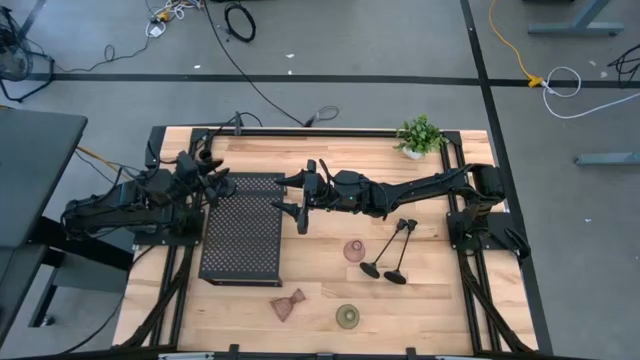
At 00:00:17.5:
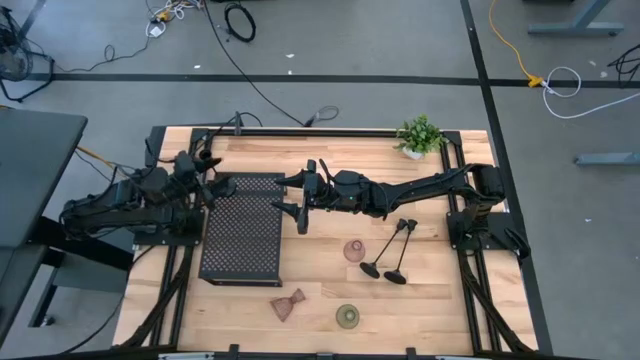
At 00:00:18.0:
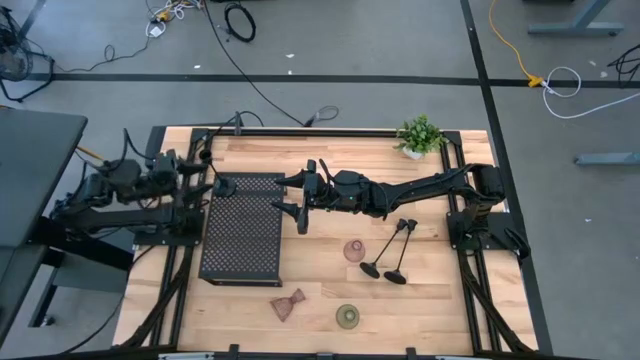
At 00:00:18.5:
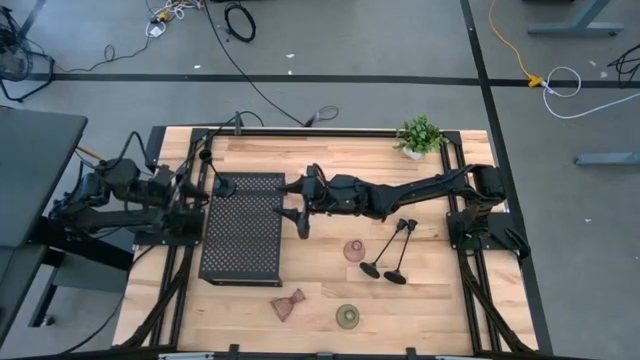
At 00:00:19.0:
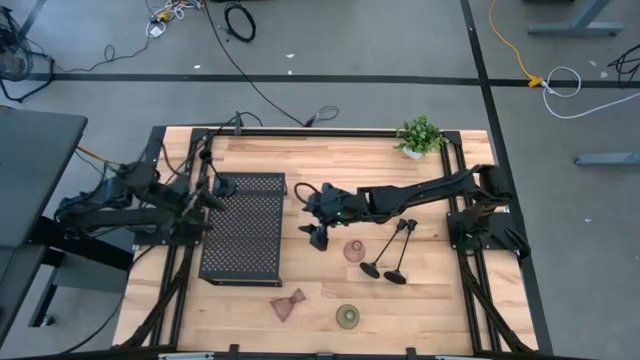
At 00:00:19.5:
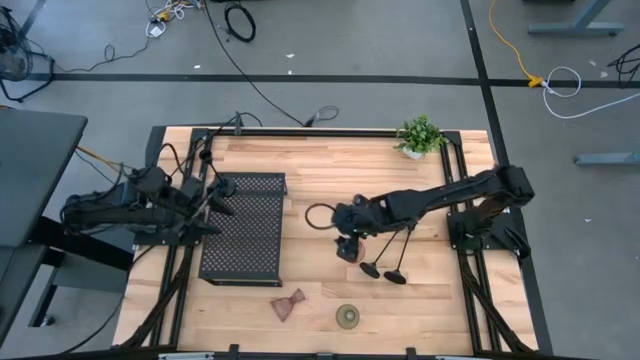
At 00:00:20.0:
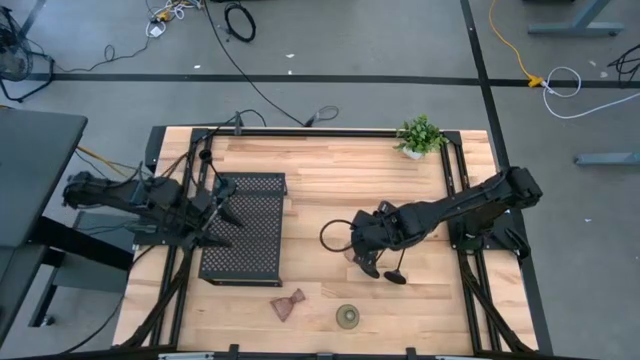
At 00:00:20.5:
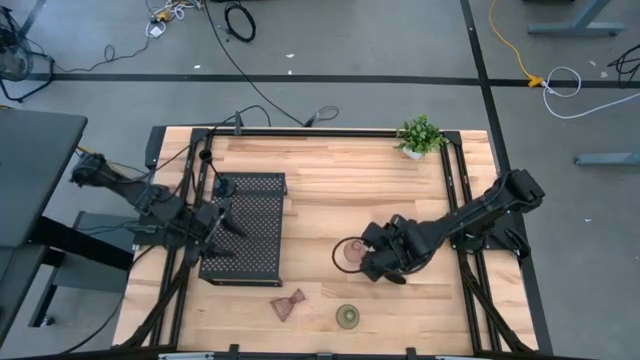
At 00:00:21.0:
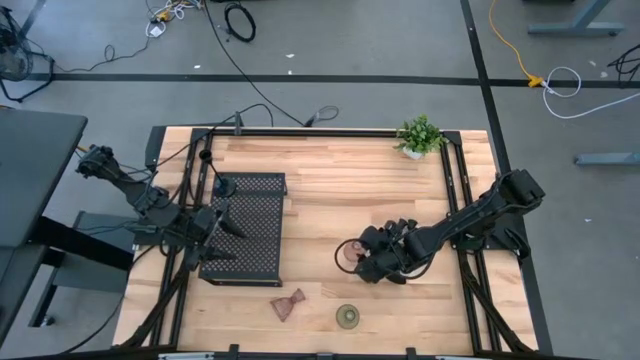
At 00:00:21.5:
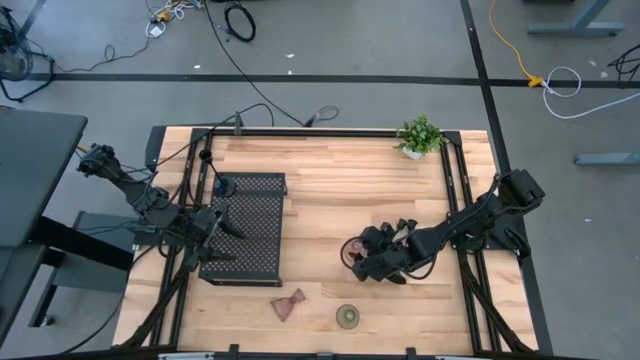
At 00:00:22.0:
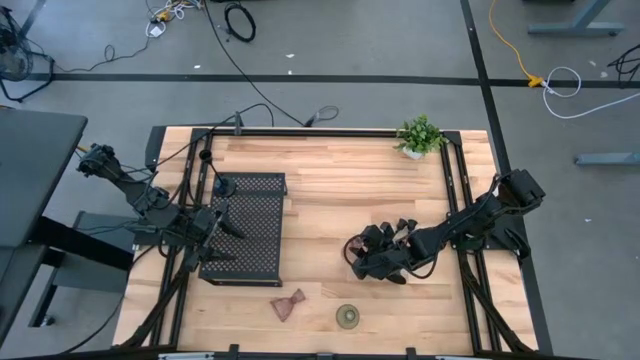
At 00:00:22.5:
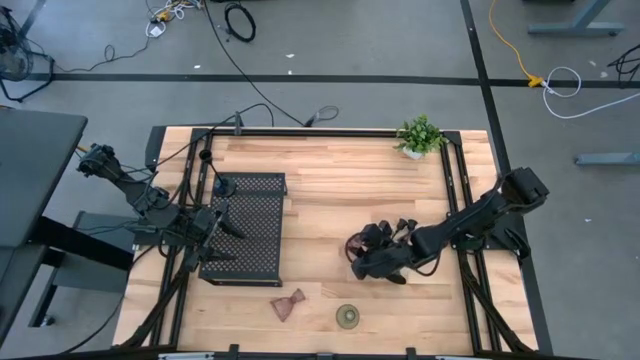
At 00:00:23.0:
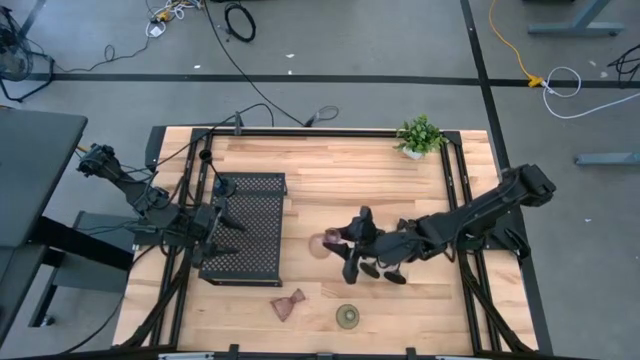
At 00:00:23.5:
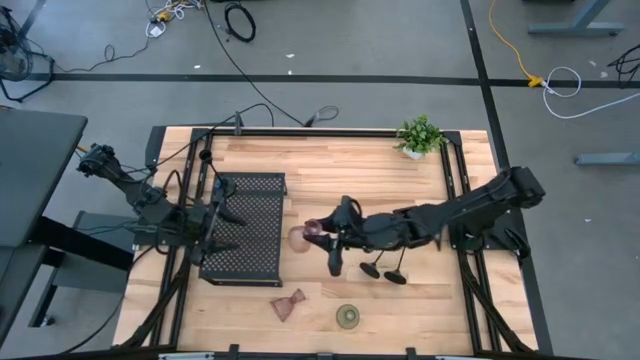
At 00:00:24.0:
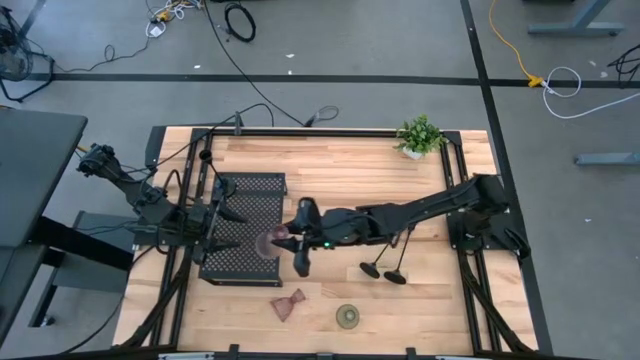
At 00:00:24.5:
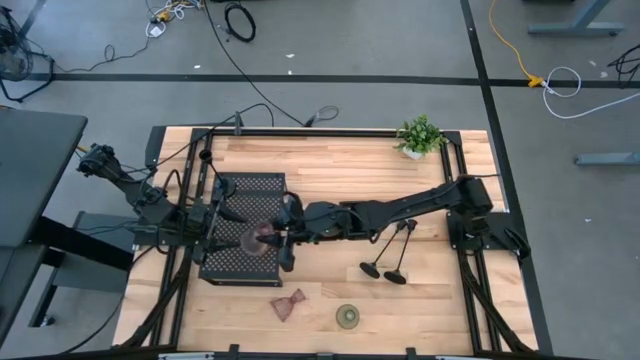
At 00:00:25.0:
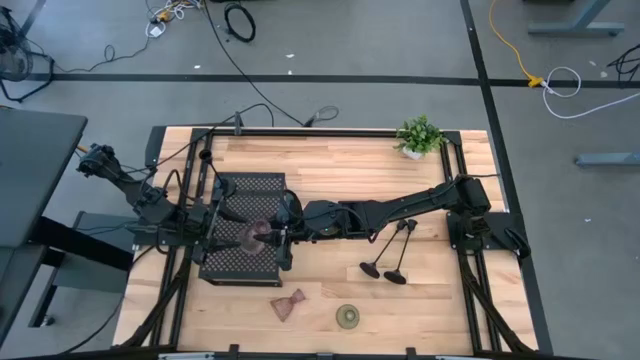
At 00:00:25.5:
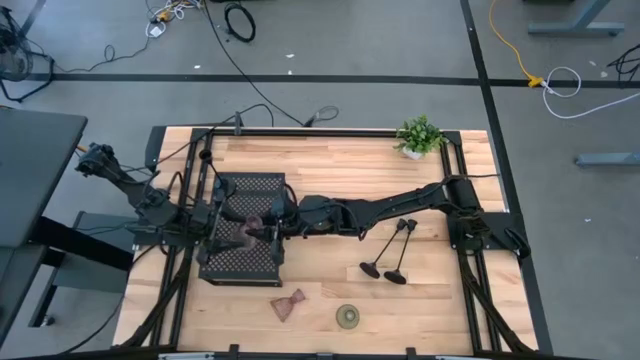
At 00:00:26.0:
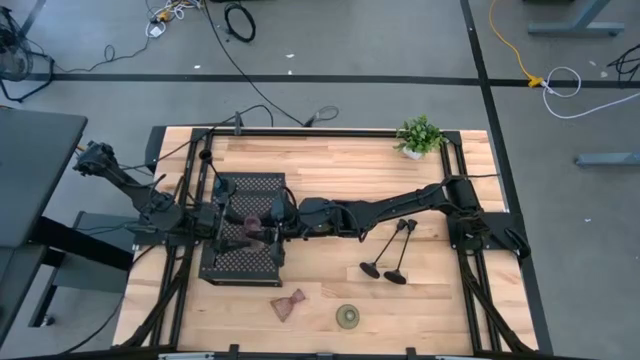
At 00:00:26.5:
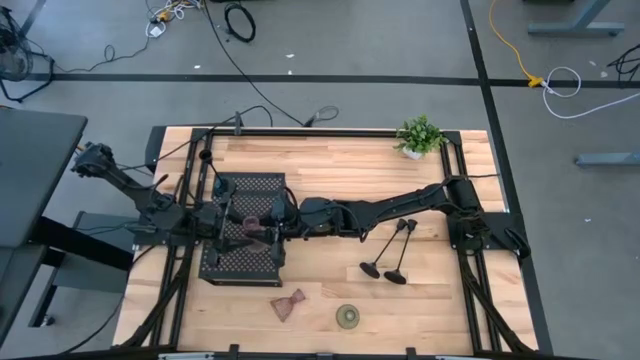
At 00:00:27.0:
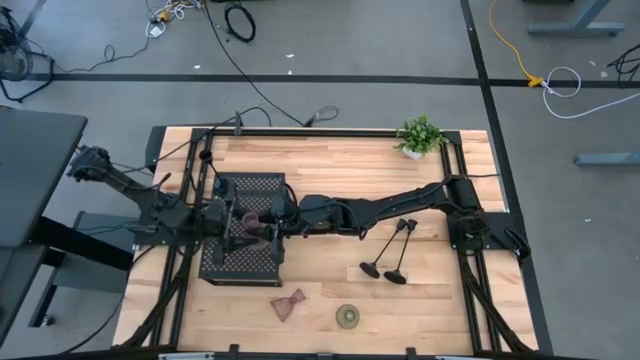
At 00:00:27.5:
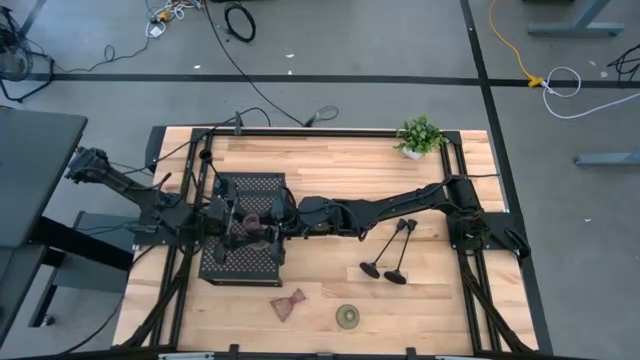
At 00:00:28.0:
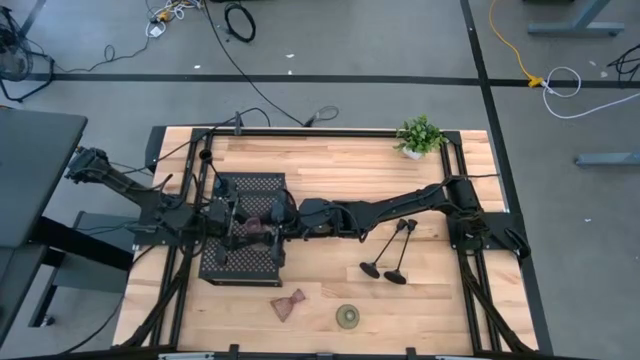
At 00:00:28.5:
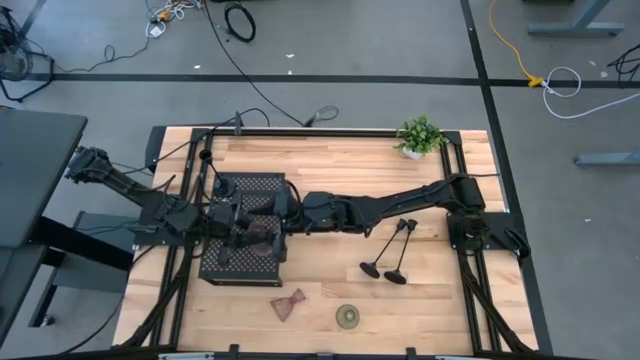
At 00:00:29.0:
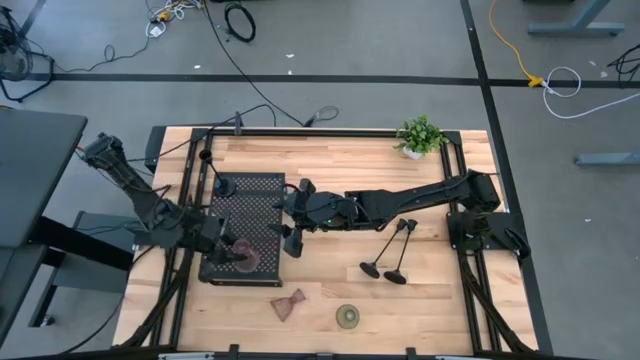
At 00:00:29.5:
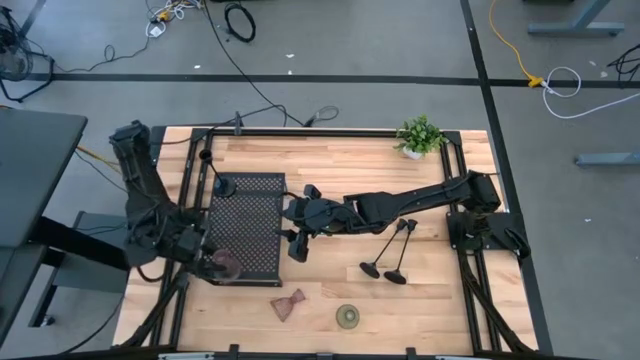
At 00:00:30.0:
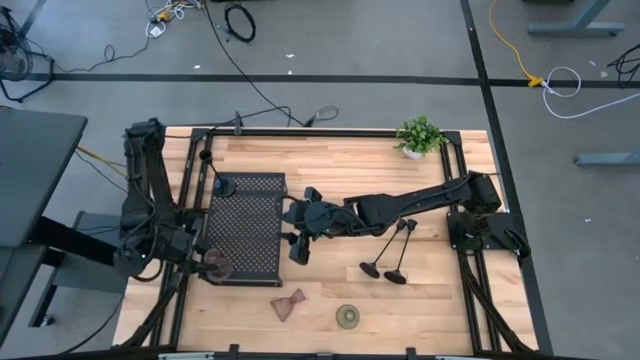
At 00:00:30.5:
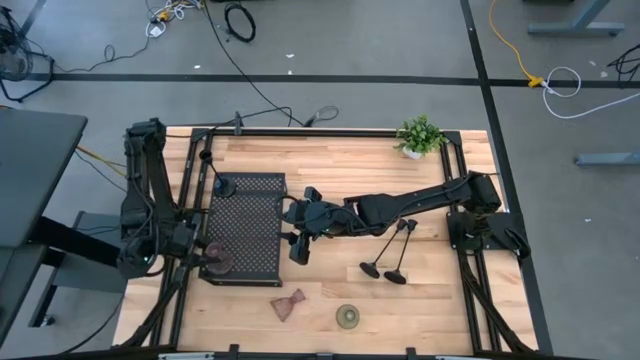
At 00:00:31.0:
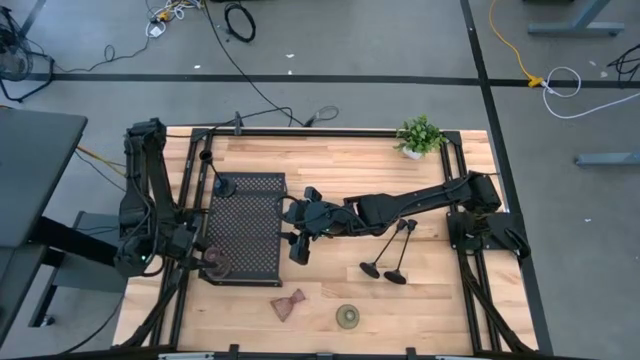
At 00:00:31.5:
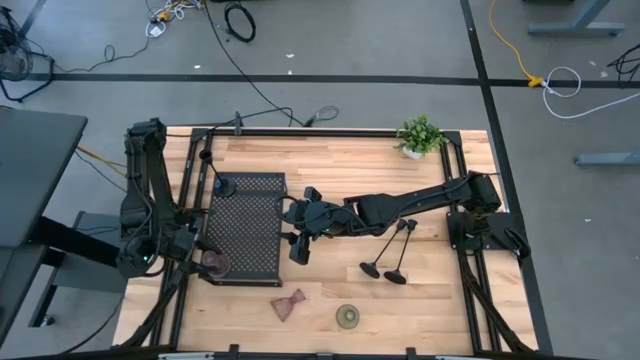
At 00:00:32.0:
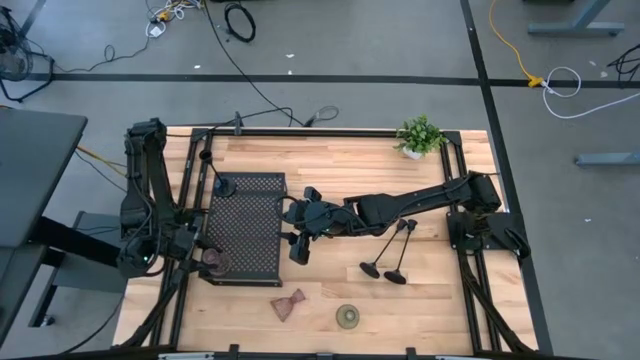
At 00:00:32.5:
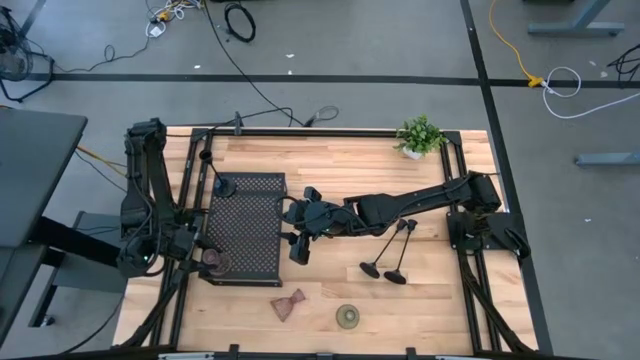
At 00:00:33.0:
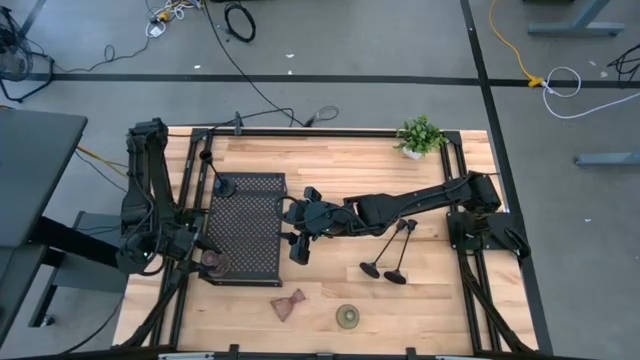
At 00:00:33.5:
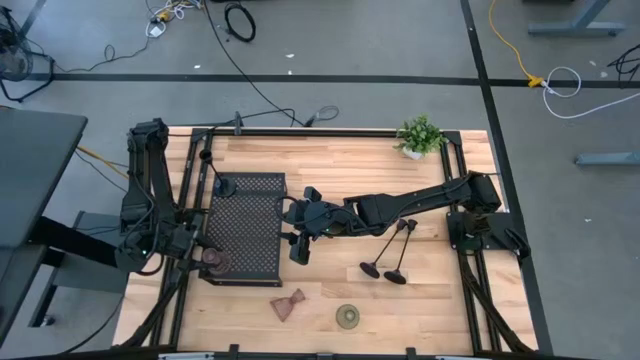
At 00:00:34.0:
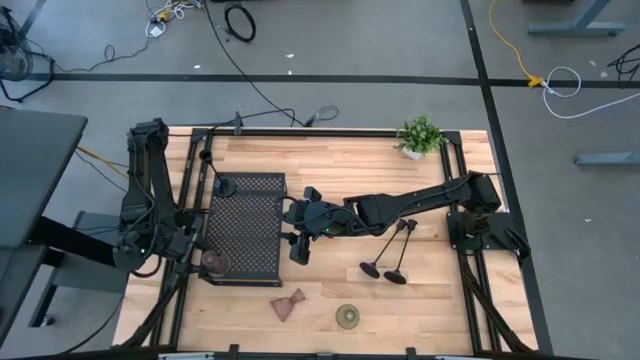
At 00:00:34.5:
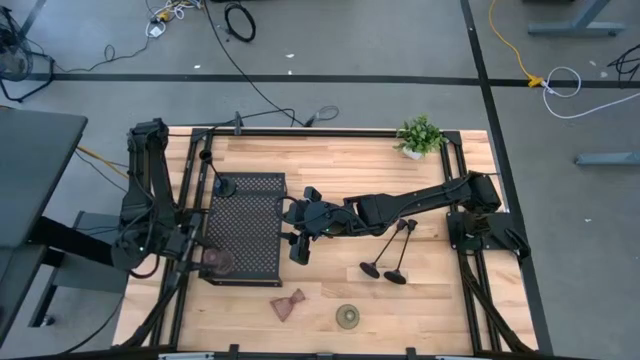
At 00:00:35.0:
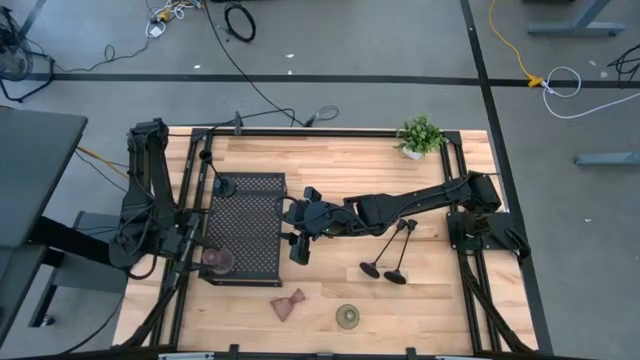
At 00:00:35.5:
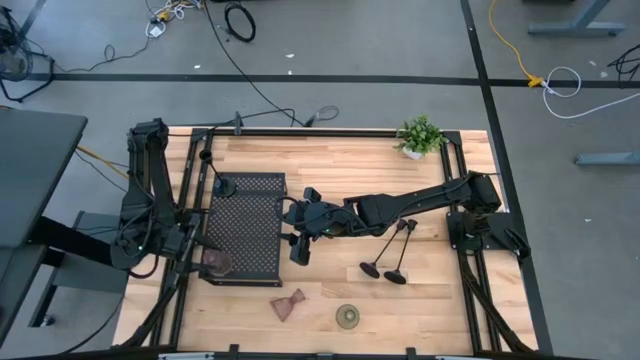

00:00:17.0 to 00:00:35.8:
Task: Pick & Place candle stick holders
Put the top pink glass candle holder on the shelf
